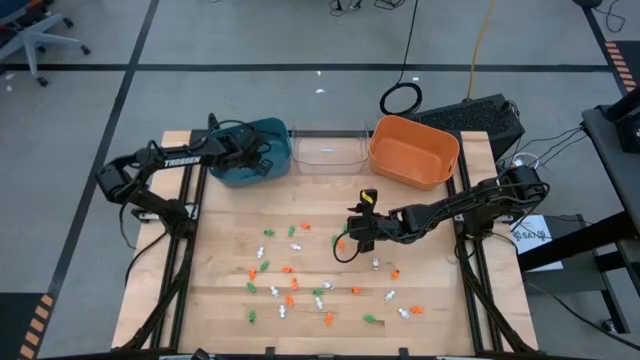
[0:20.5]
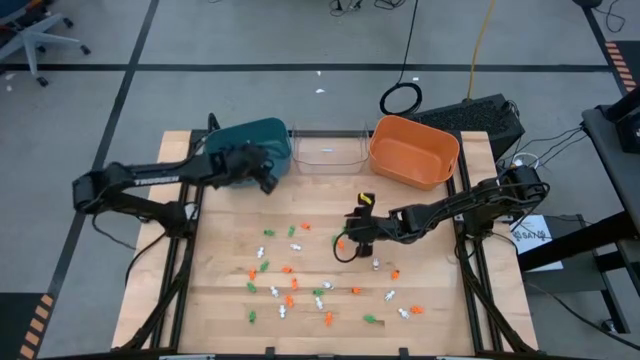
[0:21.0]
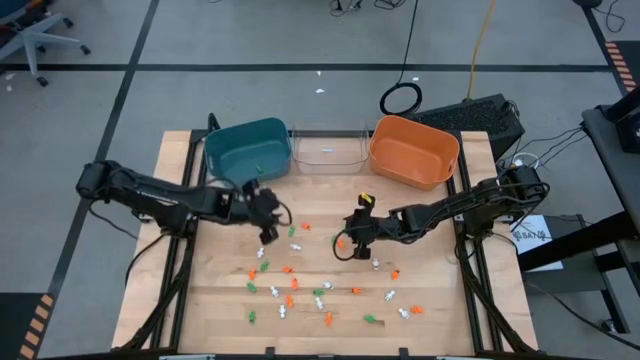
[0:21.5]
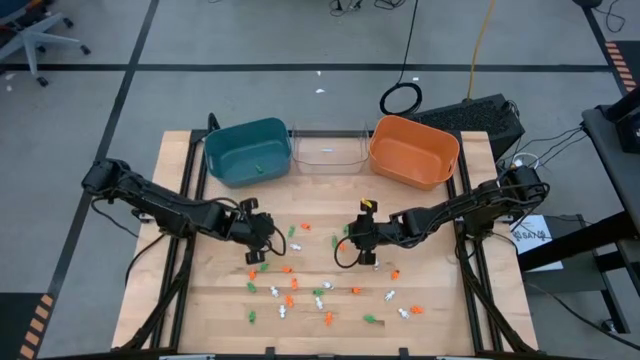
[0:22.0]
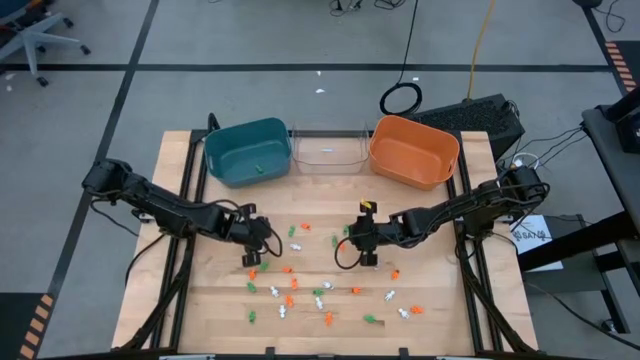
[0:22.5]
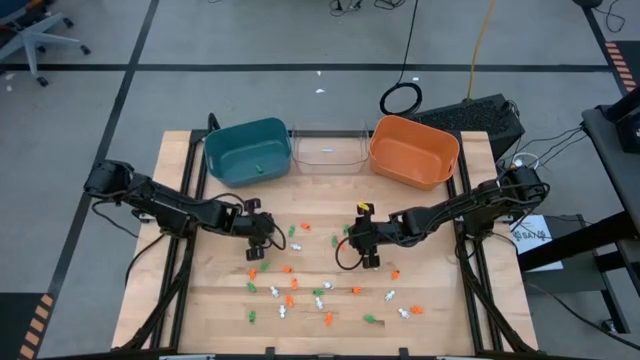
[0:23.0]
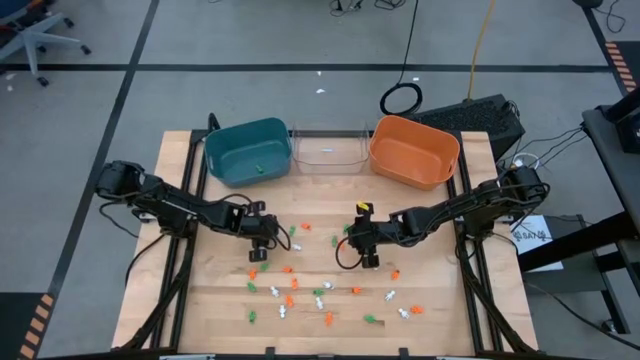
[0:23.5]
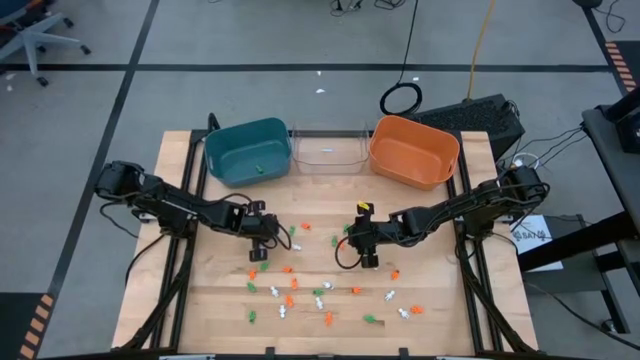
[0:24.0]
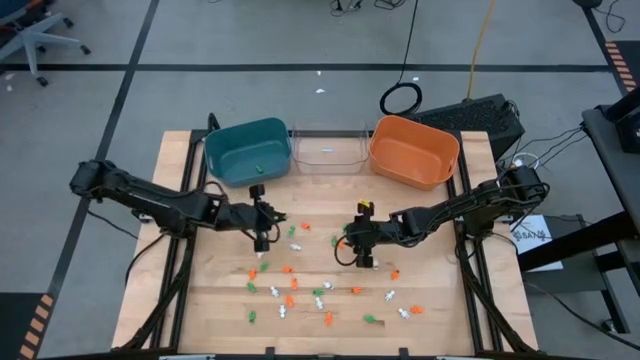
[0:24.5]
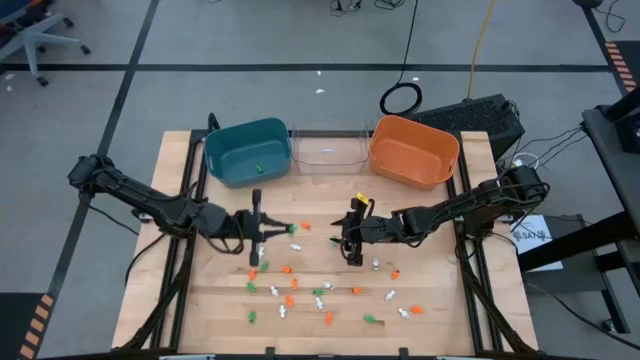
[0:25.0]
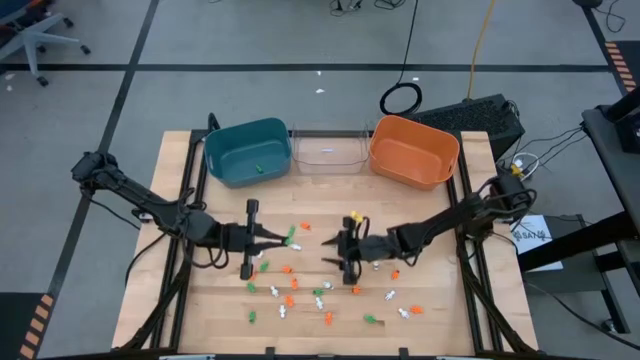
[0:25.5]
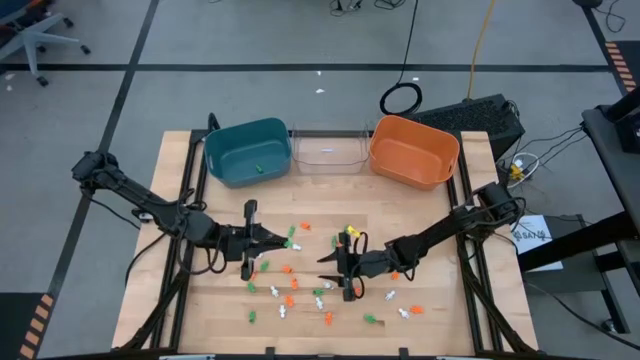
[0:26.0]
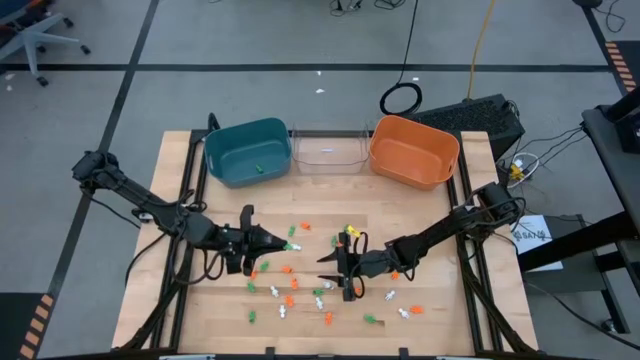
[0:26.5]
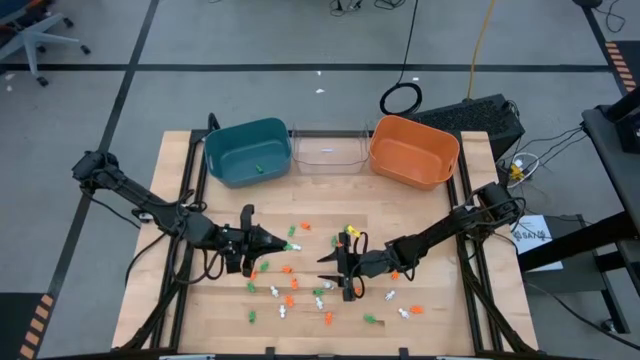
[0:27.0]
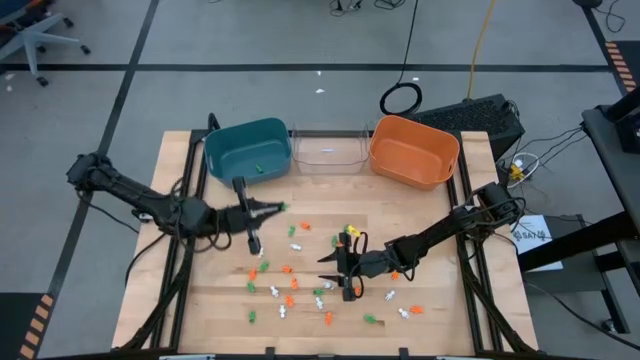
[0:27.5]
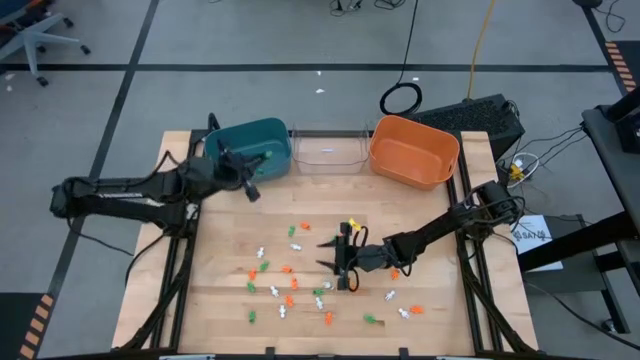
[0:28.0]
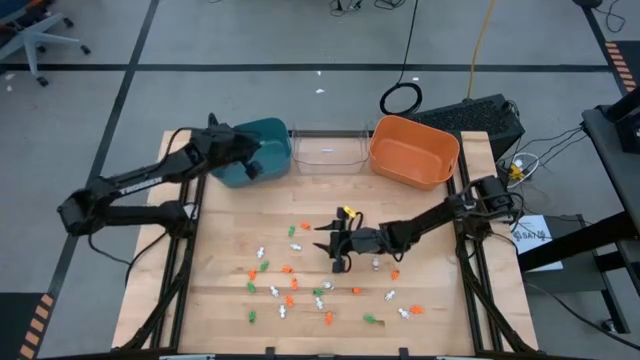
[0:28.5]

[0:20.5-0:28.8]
Task: Sort Halloween decoration
Put the green skeleton toy into the blue bin

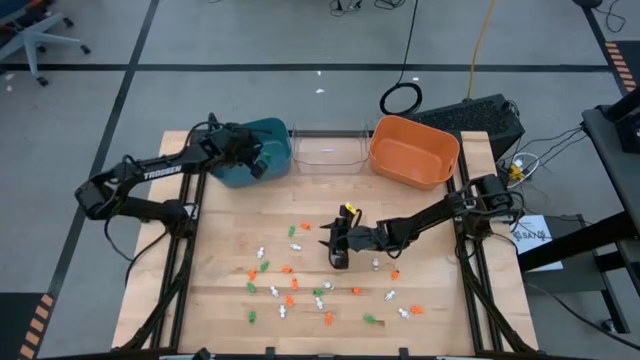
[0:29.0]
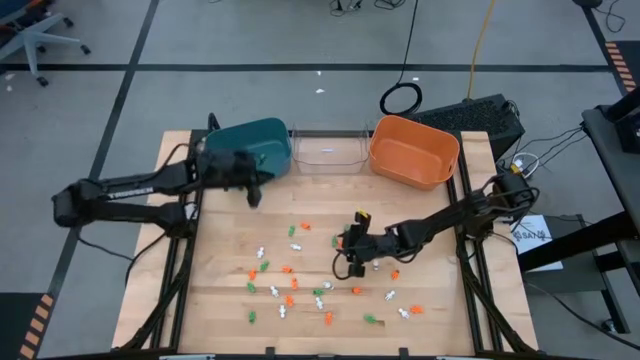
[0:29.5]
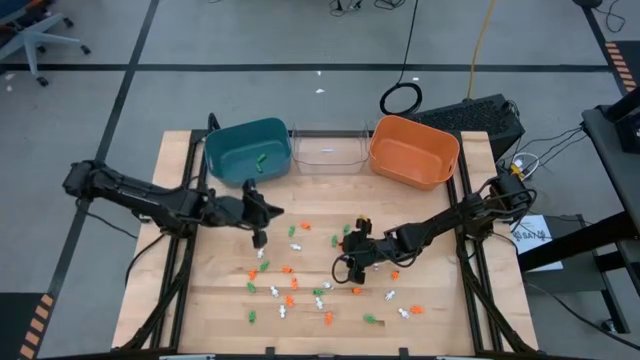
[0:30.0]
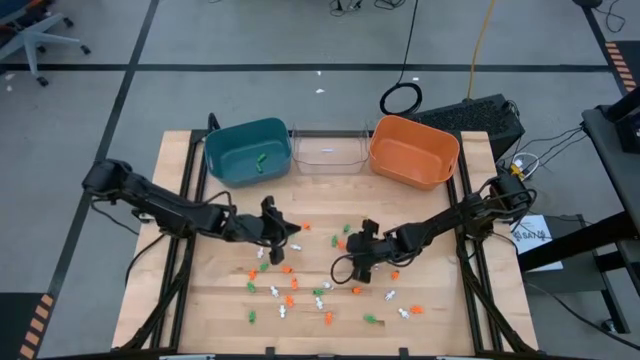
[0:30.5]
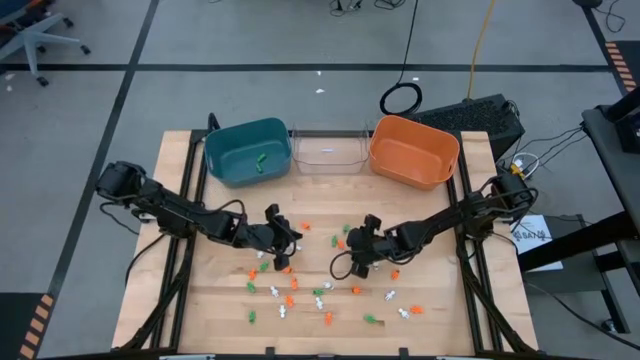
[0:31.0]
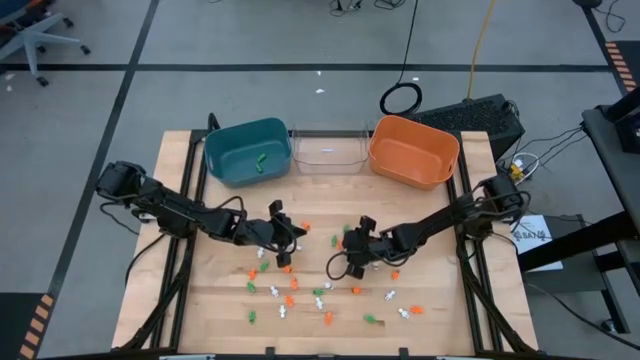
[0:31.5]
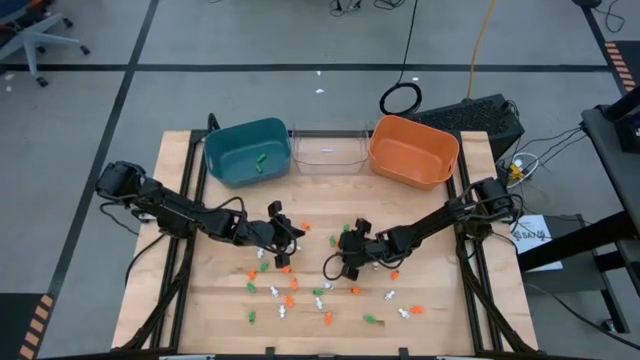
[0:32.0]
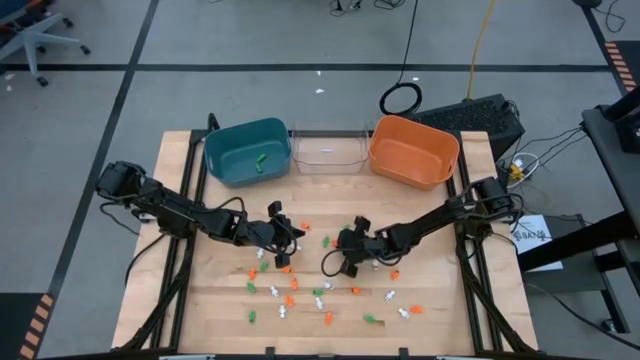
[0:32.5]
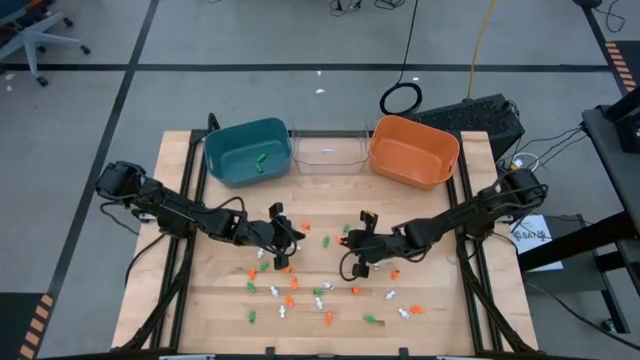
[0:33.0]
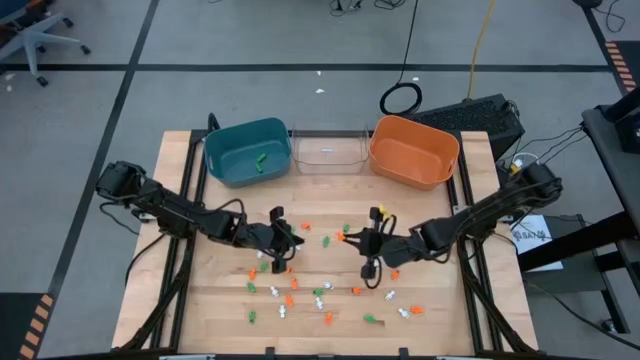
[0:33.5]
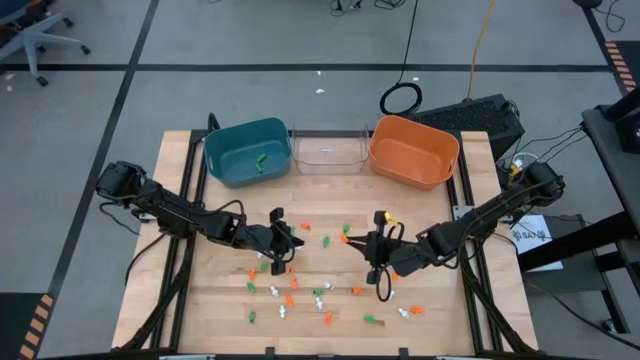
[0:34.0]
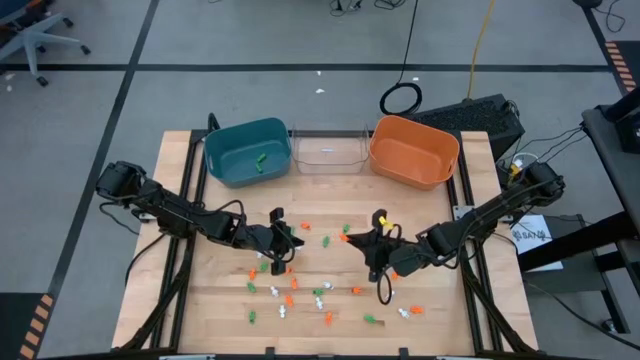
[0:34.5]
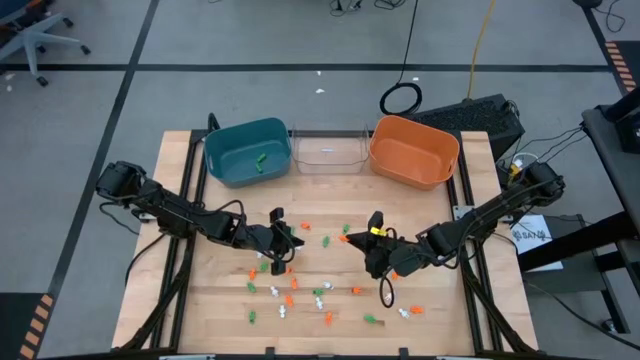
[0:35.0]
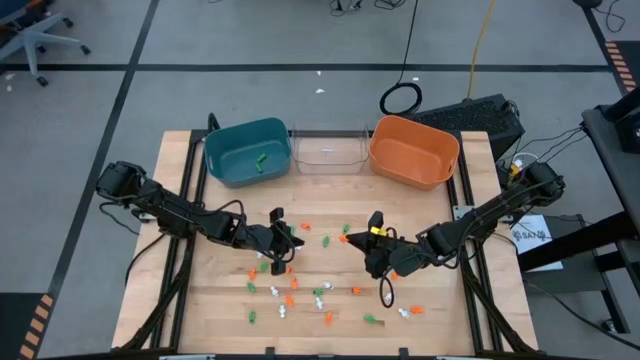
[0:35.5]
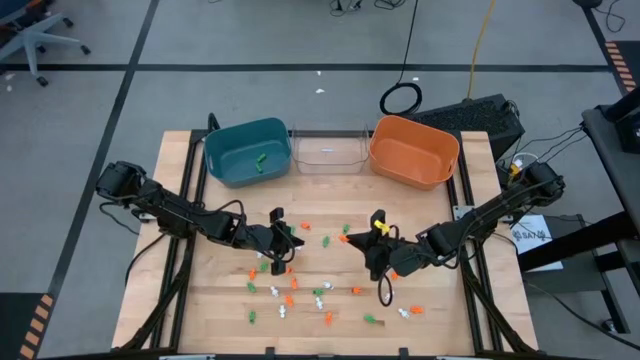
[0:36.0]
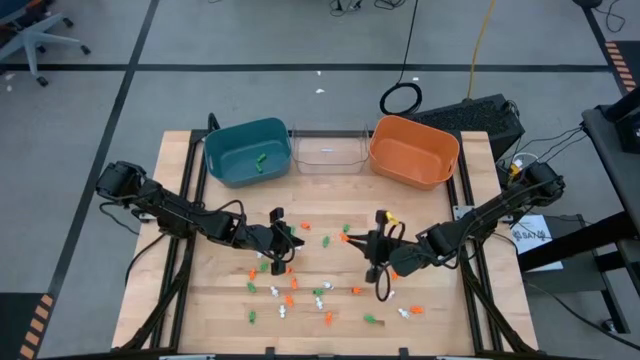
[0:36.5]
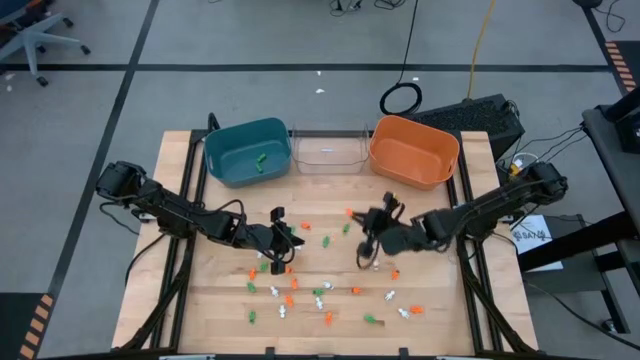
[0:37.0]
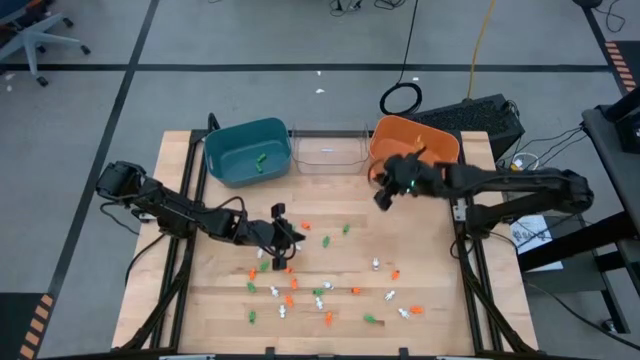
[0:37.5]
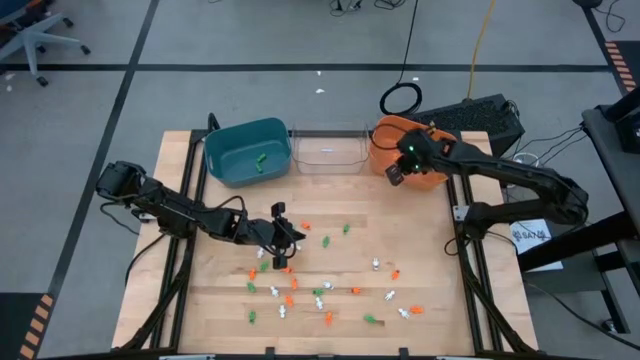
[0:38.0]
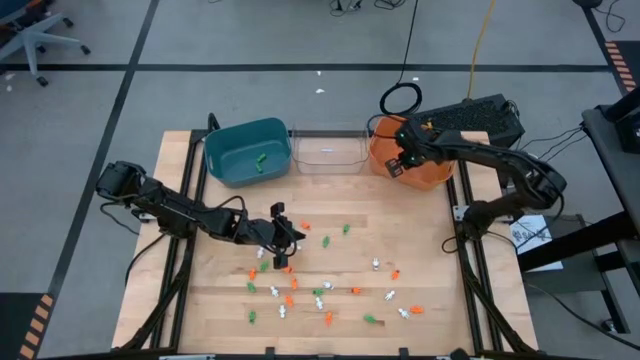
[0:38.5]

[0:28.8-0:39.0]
Put the orange skeleton toy into the orange bin

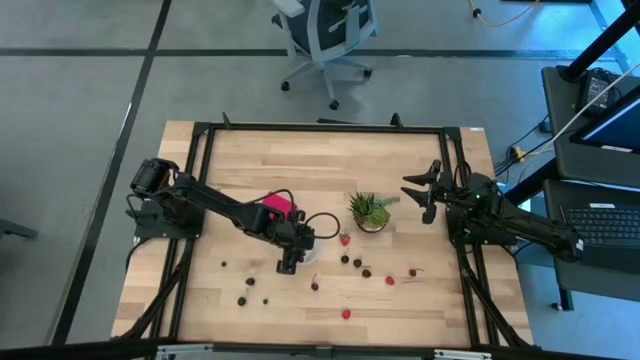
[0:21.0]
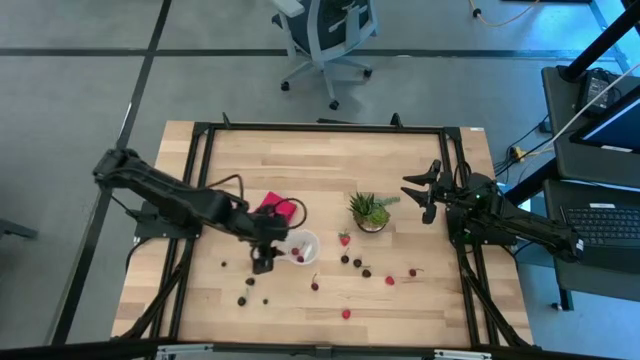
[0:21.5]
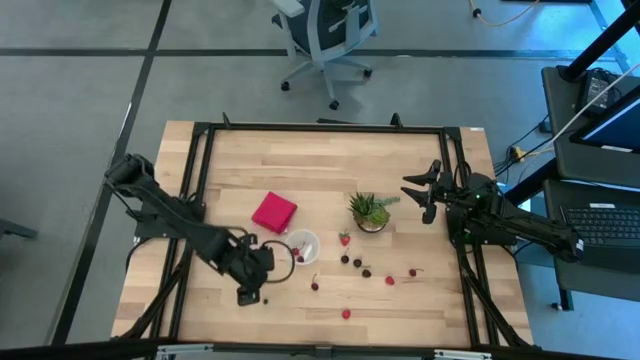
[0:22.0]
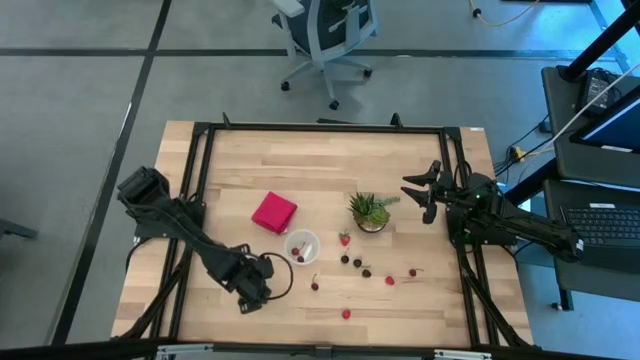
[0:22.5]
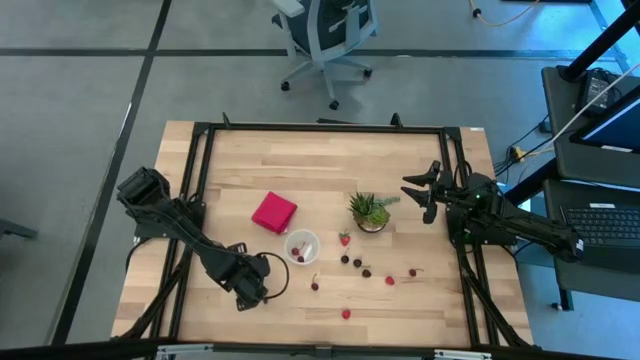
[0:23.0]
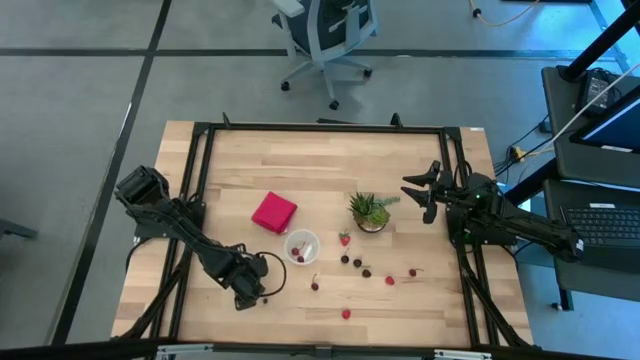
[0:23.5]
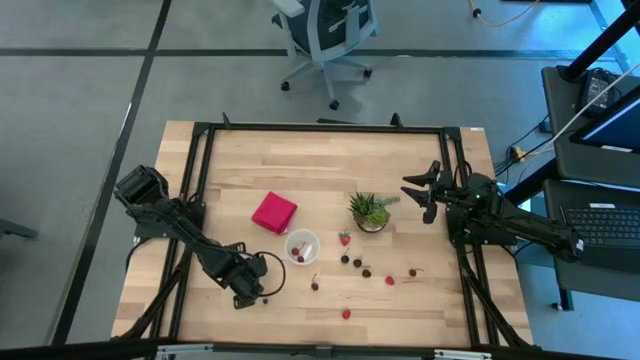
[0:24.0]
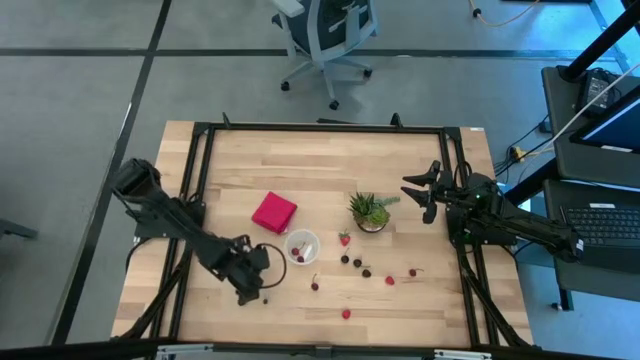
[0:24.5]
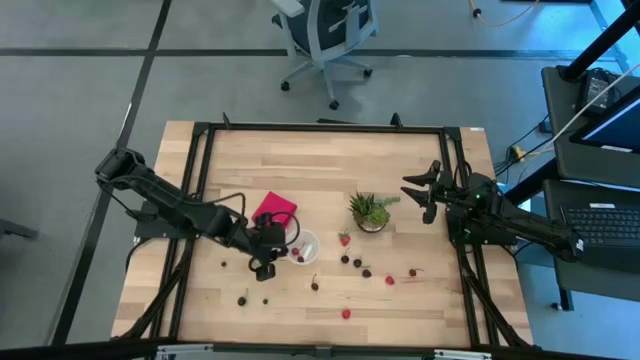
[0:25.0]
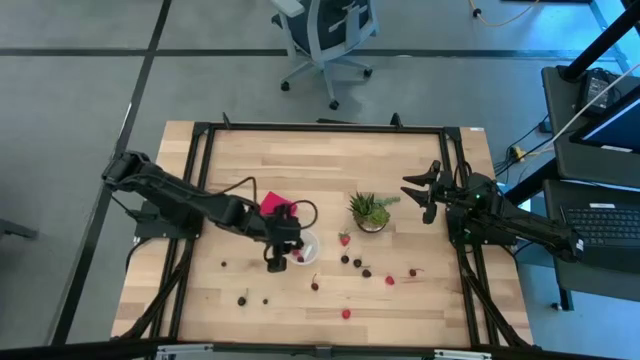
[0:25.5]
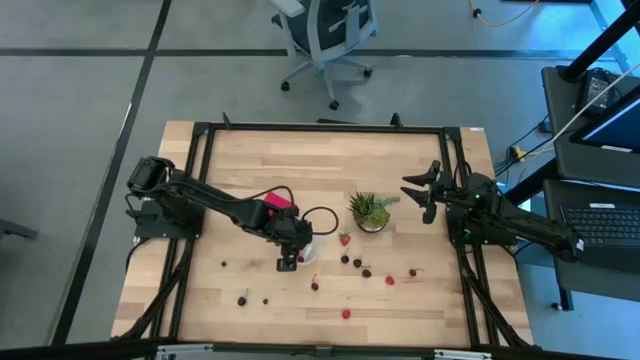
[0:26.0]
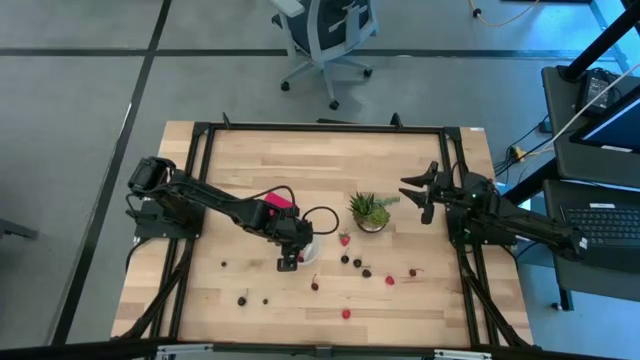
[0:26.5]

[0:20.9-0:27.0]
Task: Pick and placing Produce into tupperware
Put the blackberry into the container
